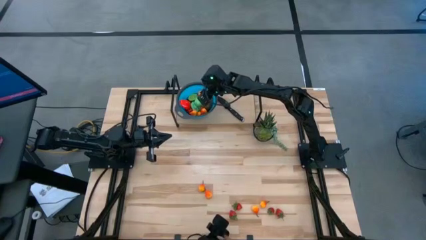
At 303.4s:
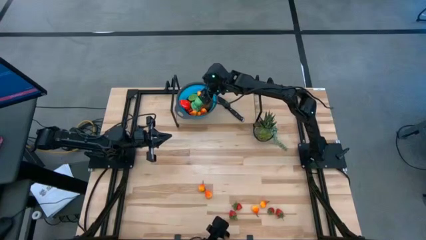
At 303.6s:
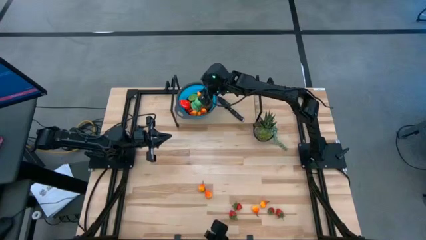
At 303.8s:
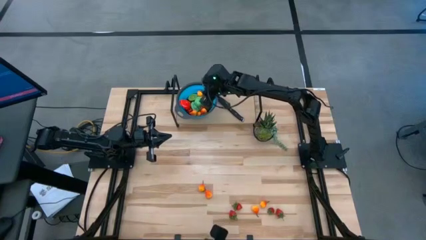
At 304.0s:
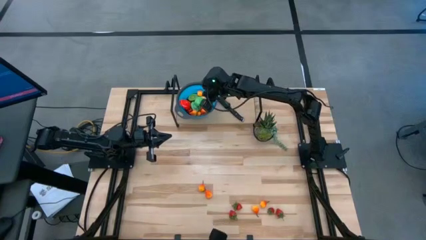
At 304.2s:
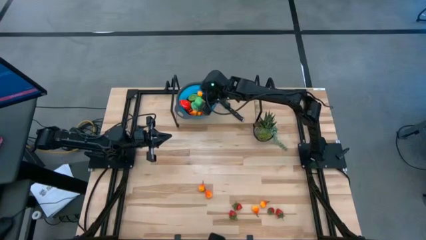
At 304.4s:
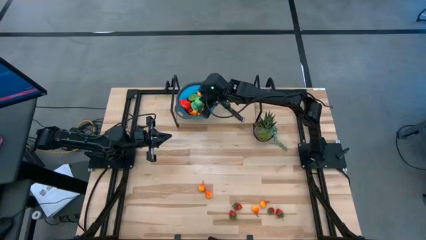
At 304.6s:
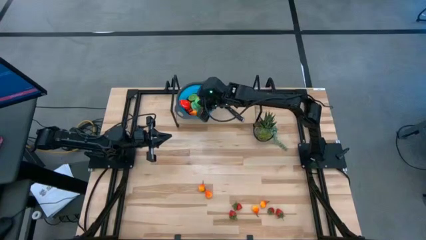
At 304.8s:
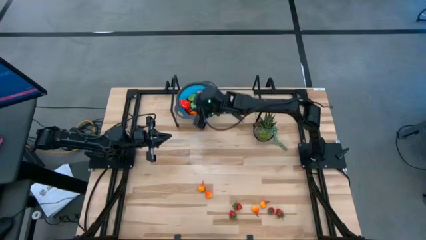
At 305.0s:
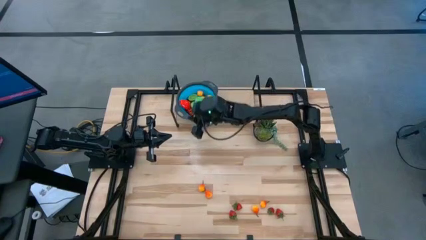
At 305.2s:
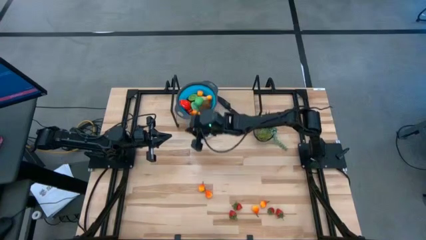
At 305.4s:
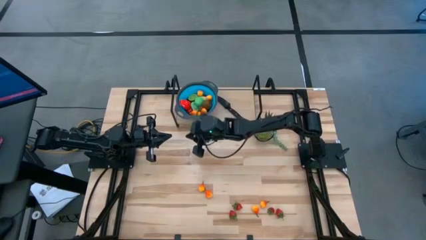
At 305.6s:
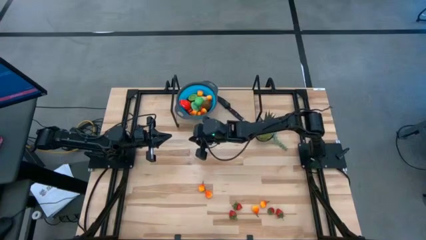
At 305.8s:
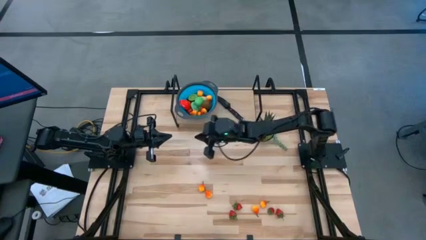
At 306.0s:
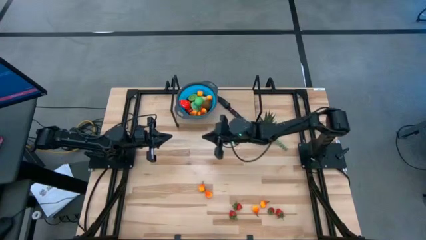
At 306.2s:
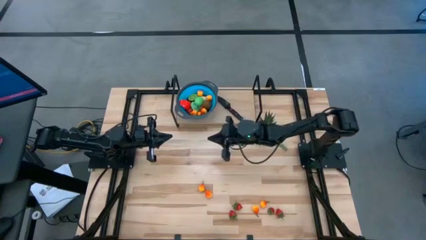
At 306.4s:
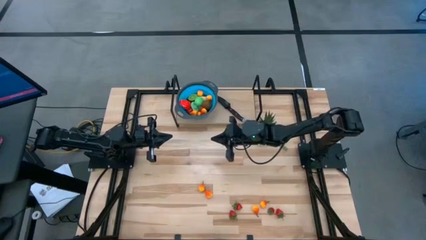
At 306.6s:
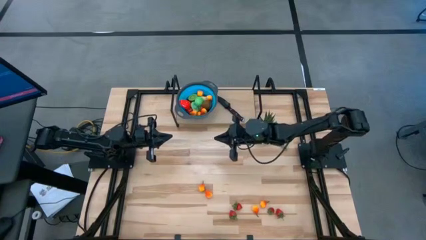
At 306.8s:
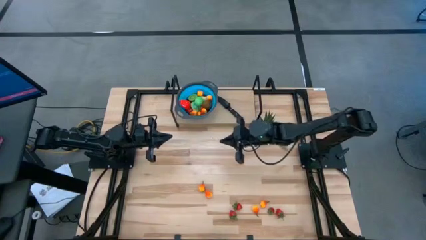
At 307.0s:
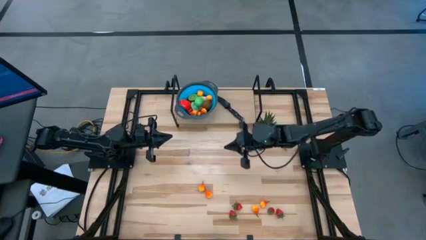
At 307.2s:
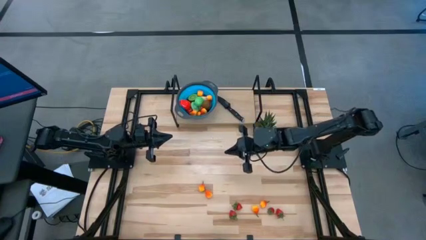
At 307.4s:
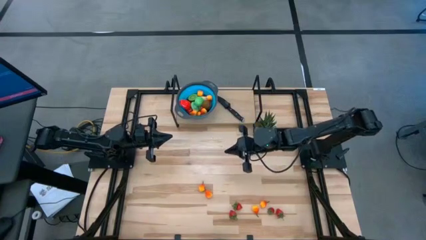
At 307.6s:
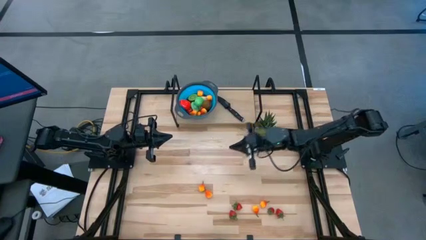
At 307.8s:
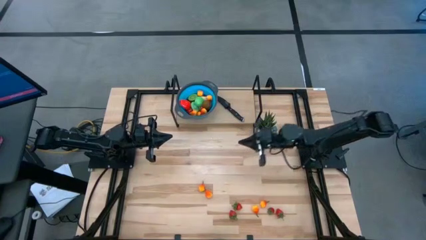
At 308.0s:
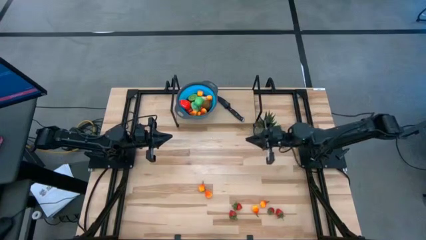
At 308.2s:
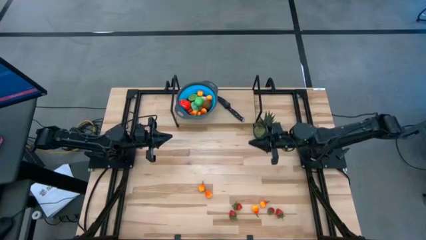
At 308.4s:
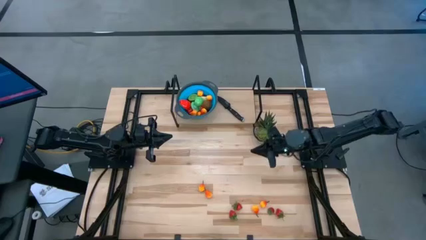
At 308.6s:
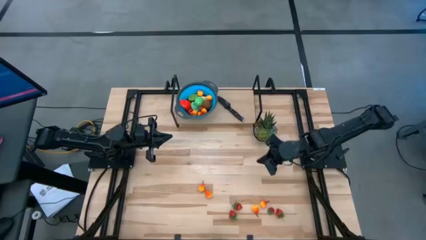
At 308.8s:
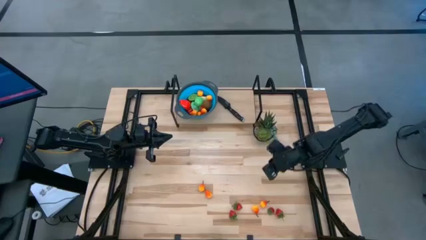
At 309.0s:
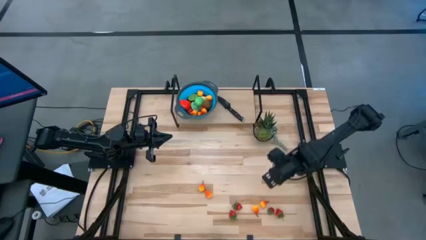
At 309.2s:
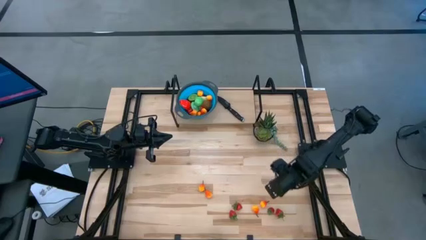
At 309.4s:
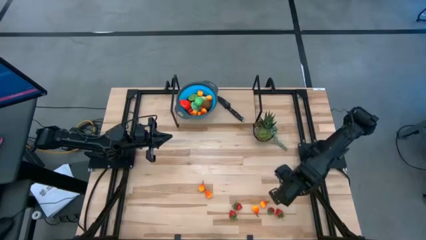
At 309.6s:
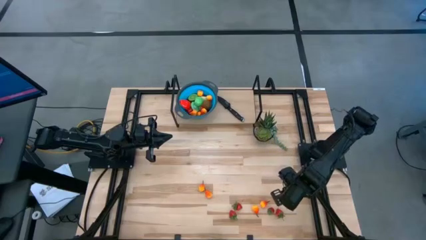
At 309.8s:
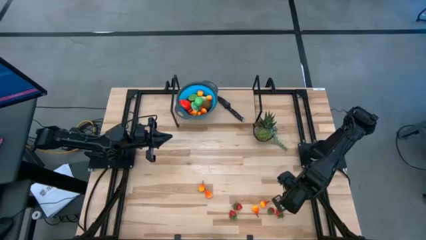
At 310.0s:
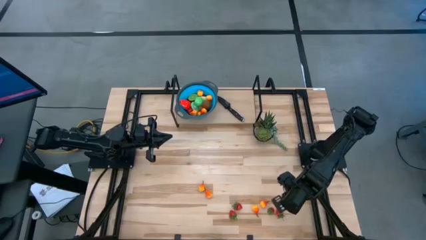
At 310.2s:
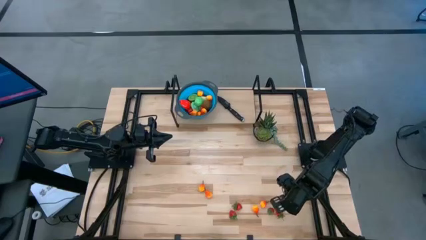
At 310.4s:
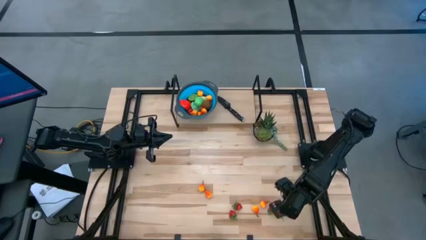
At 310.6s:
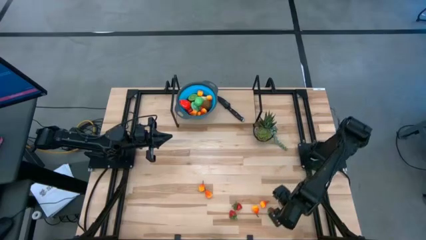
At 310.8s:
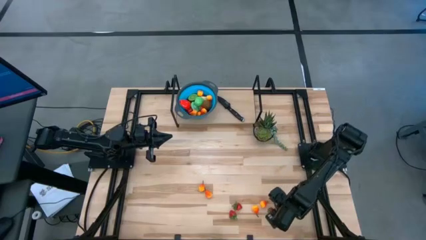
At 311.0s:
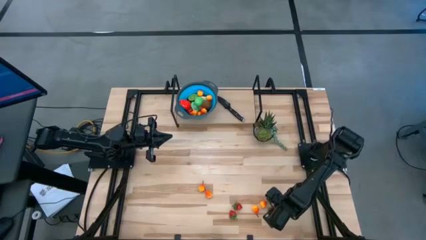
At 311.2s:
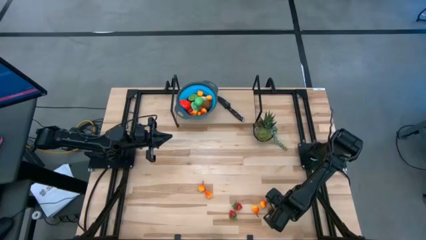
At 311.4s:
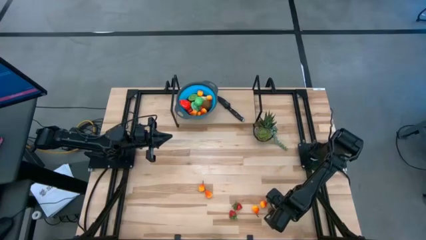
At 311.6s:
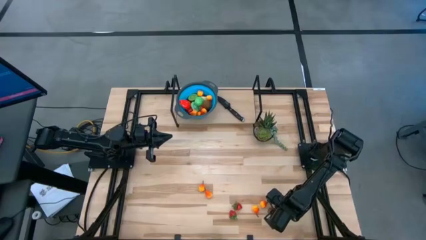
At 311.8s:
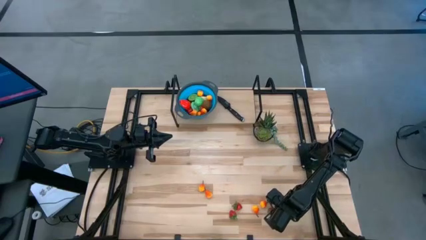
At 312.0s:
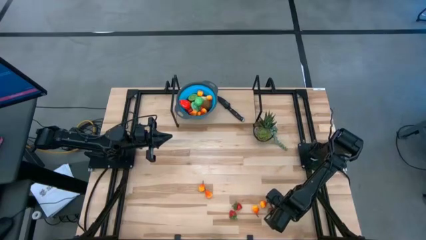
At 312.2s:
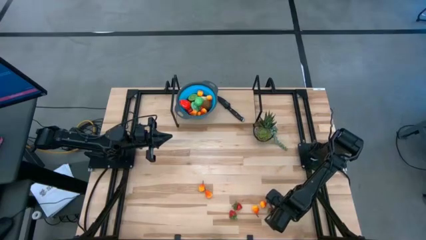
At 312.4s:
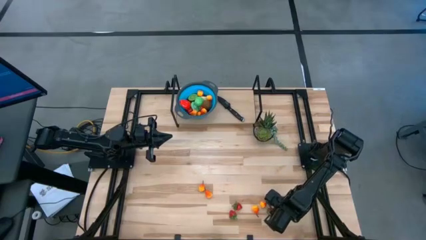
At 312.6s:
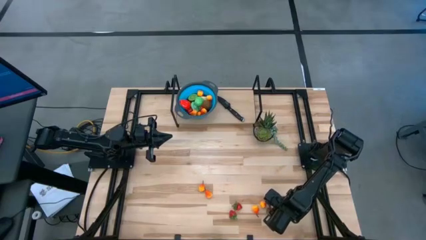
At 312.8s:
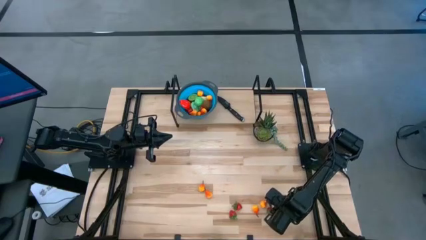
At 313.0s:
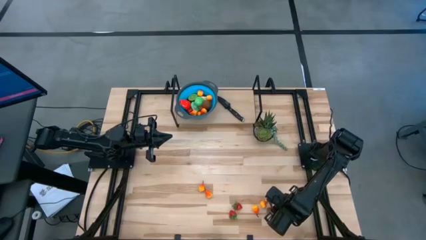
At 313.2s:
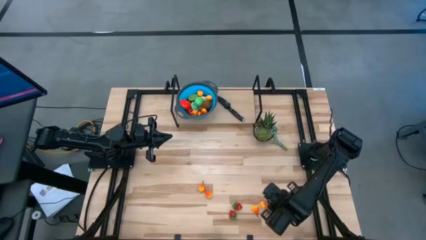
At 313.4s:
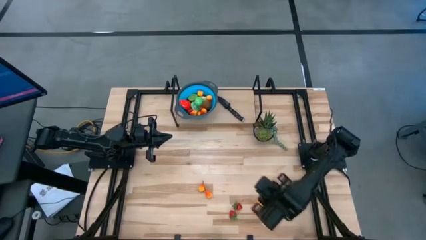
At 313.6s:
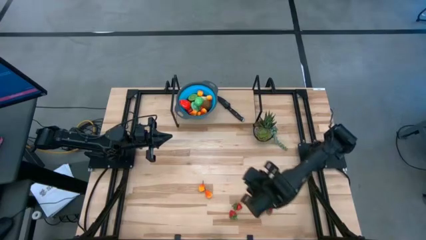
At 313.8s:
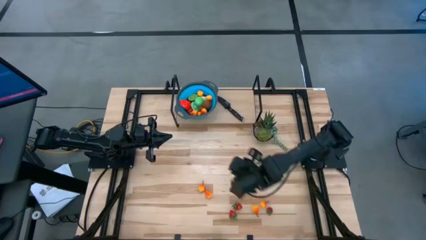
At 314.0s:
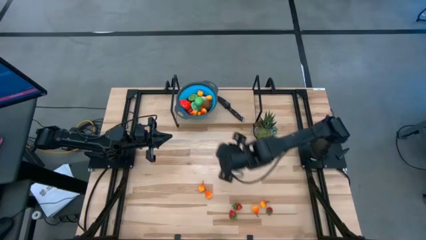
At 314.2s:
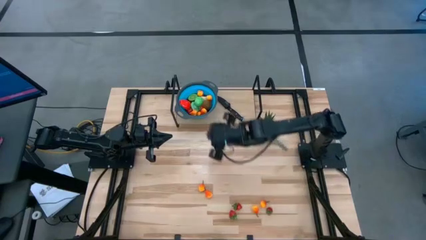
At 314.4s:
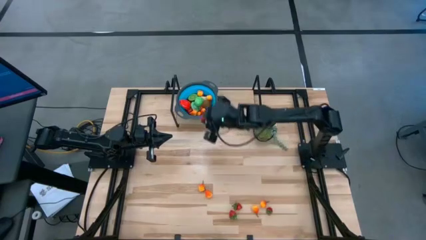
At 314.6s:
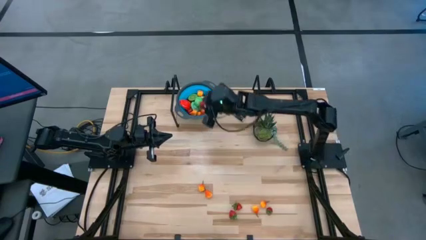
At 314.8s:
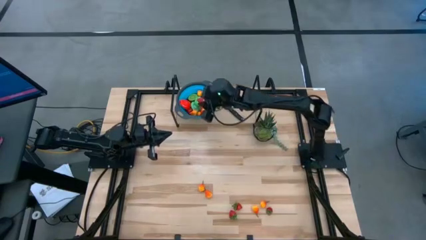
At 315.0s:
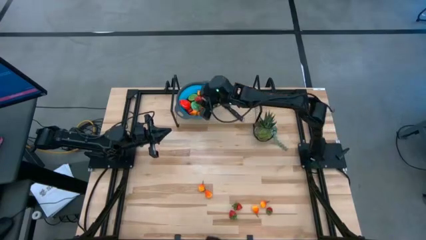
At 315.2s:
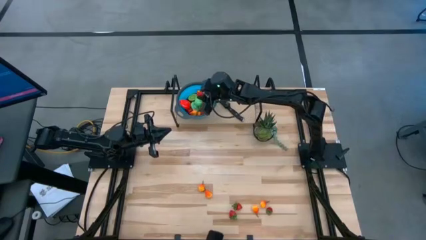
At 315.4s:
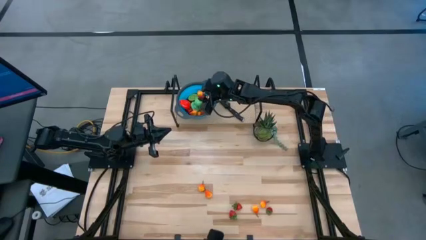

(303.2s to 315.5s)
Task: Pick & Place Fruit
Put the strawberry into the basket

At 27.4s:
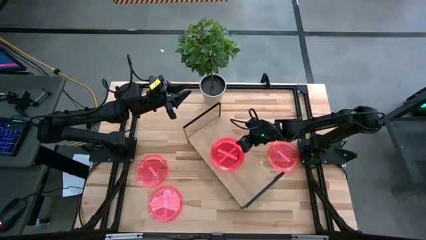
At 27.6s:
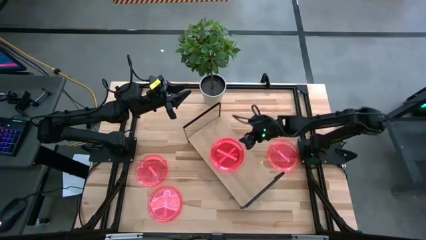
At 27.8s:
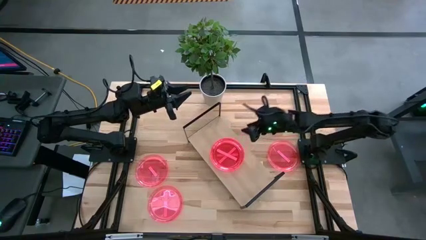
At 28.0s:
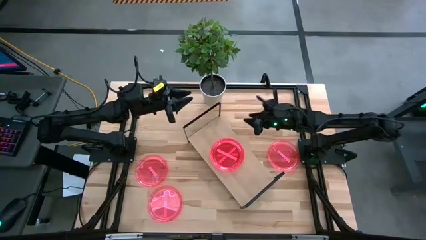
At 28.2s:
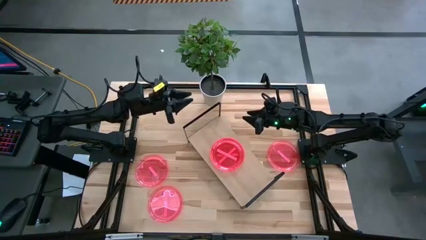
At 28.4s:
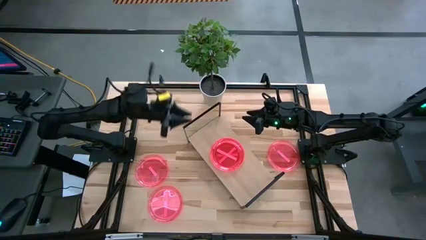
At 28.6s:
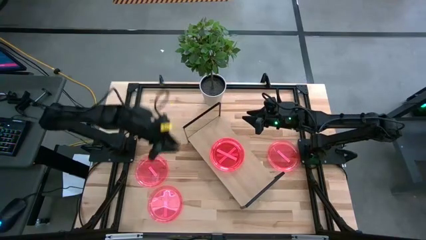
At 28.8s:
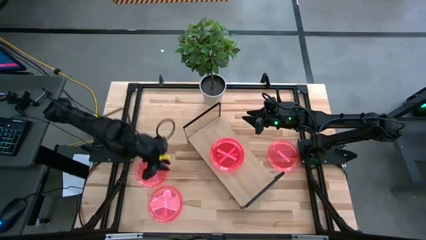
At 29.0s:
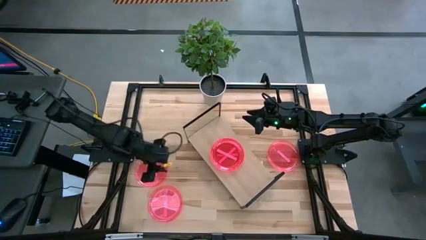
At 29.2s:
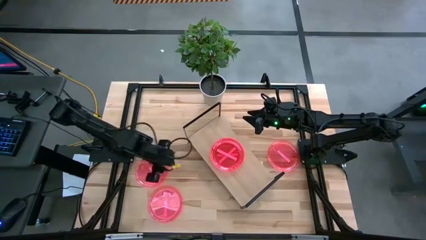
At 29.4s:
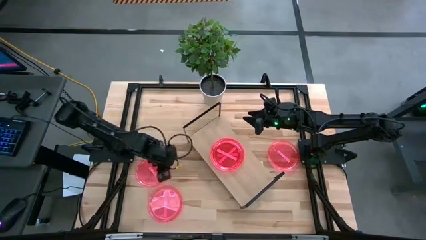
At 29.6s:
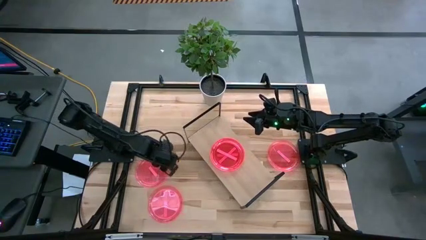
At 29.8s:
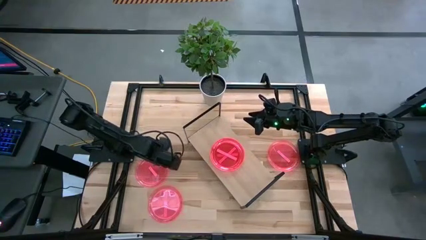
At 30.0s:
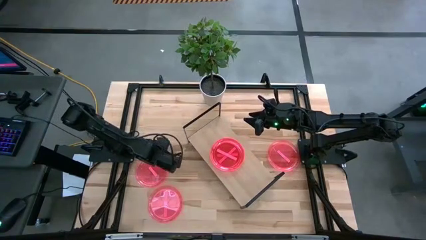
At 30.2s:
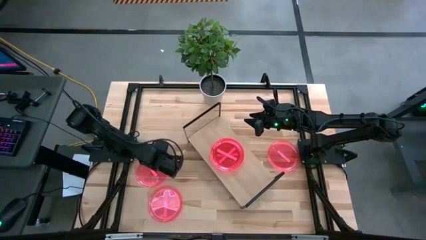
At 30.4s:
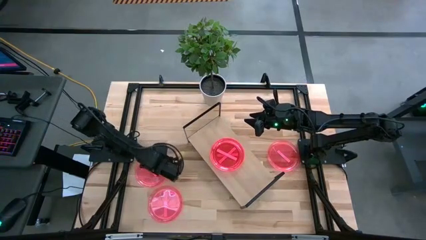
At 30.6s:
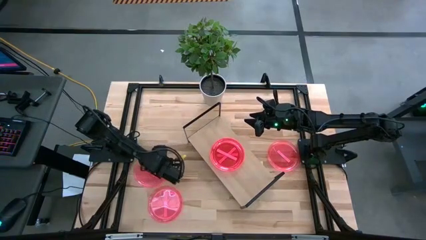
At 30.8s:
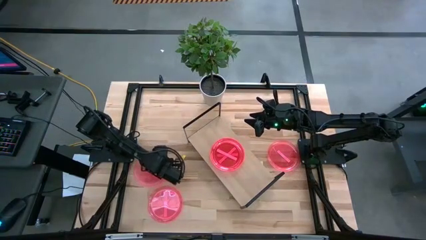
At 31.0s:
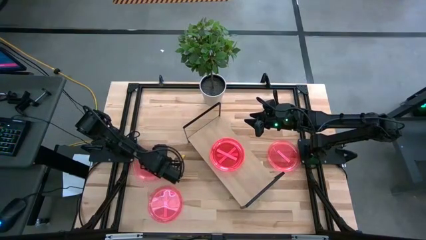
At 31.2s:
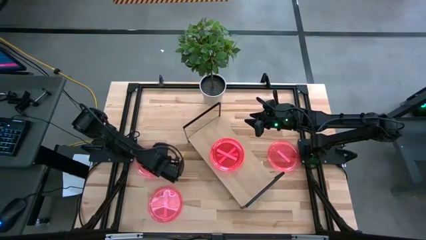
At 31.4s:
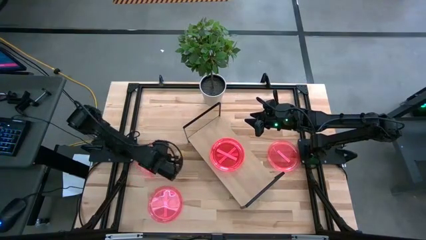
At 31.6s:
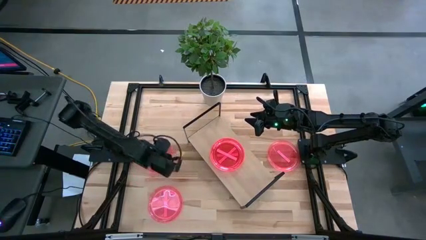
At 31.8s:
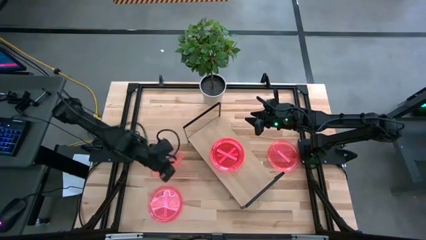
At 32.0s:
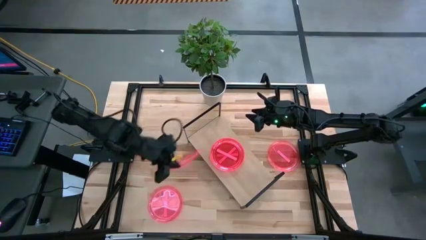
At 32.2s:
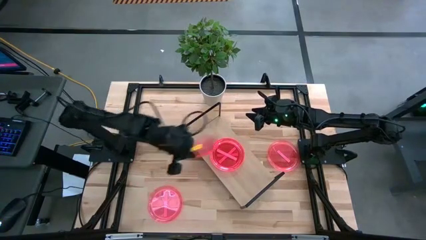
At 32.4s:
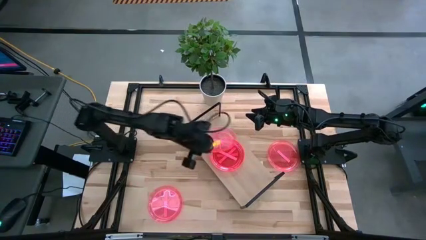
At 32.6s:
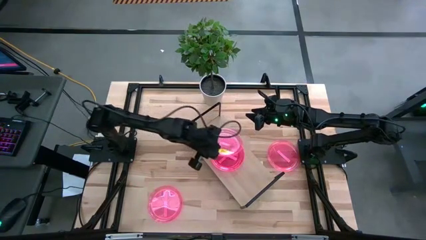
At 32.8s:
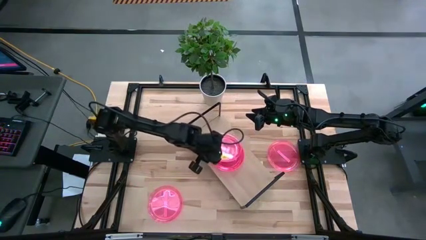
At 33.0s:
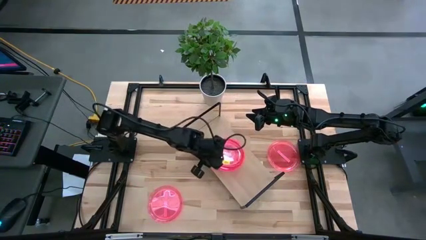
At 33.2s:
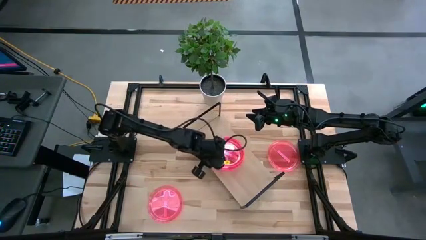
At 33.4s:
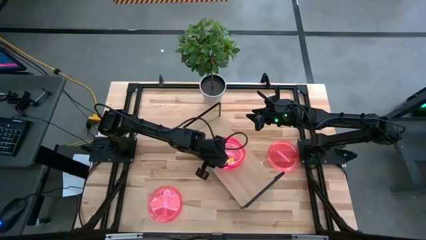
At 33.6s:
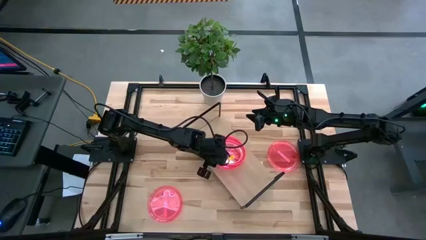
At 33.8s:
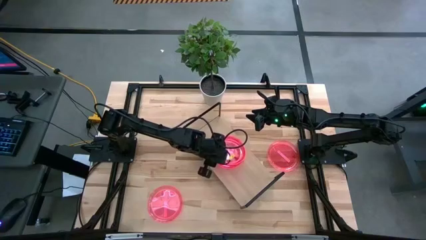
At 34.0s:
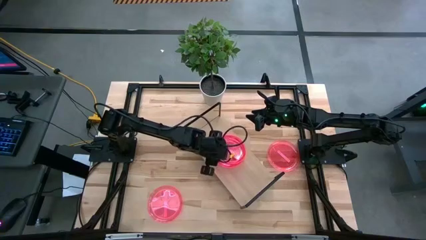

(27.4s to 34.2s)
Task: Place and stack plates onto a shelf
Stack the pink plate on top of the other pink plate on the shelf
